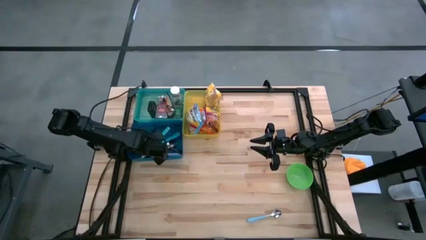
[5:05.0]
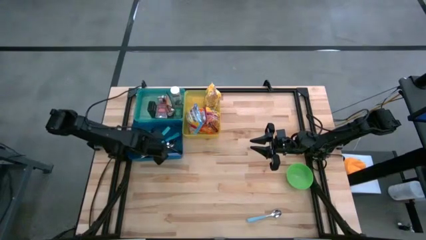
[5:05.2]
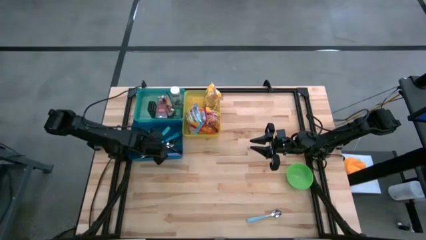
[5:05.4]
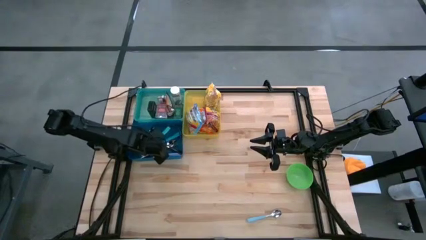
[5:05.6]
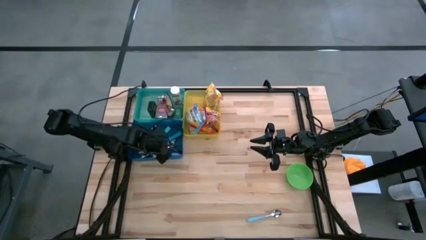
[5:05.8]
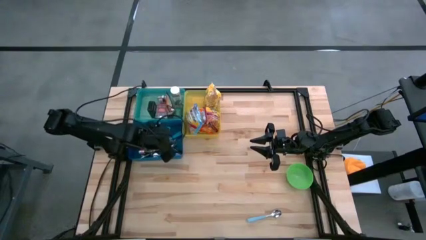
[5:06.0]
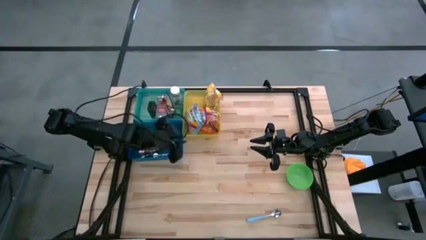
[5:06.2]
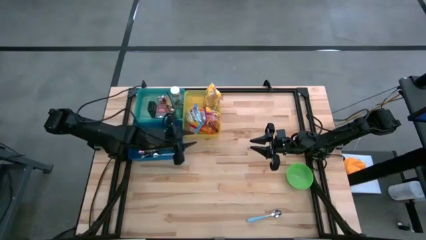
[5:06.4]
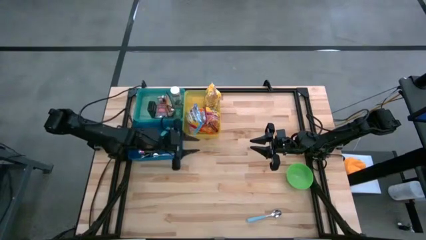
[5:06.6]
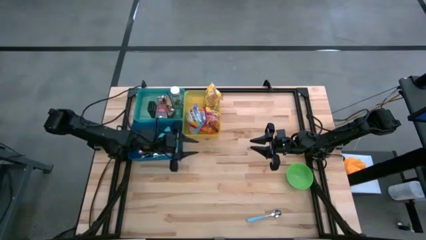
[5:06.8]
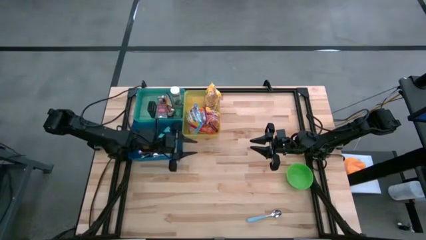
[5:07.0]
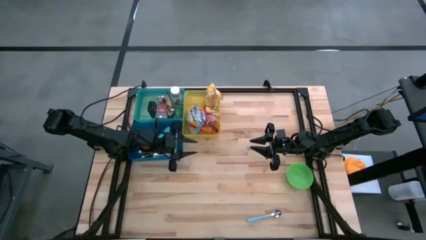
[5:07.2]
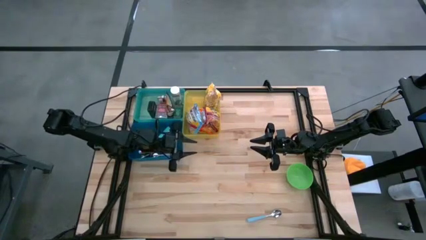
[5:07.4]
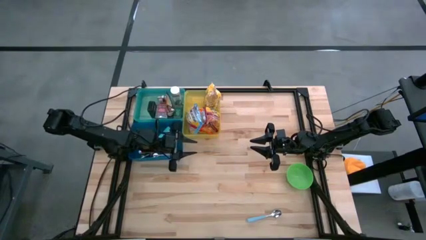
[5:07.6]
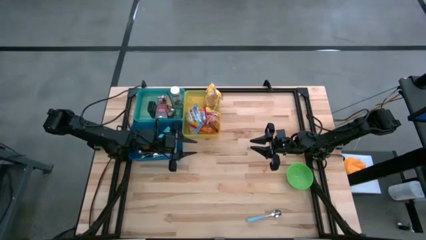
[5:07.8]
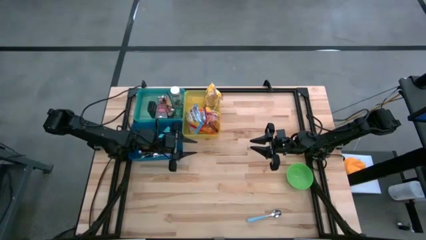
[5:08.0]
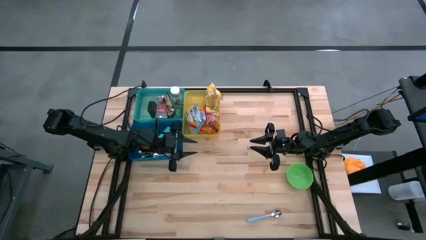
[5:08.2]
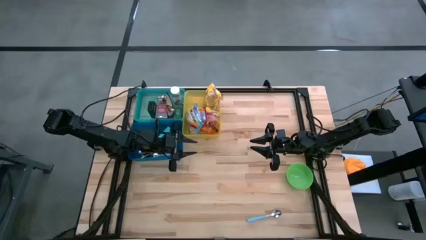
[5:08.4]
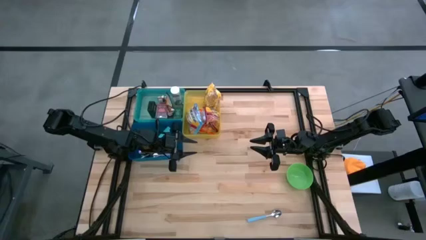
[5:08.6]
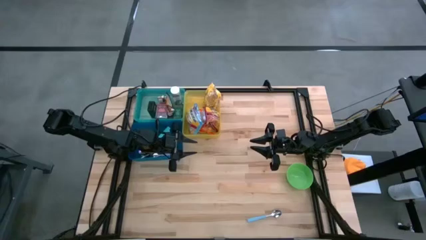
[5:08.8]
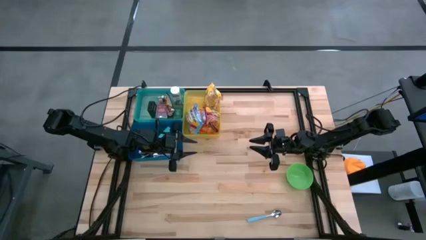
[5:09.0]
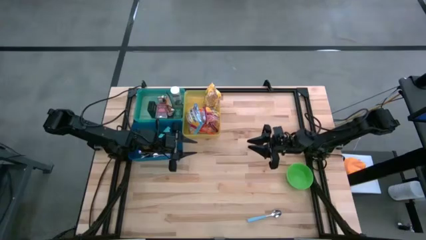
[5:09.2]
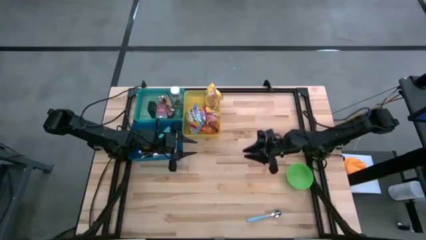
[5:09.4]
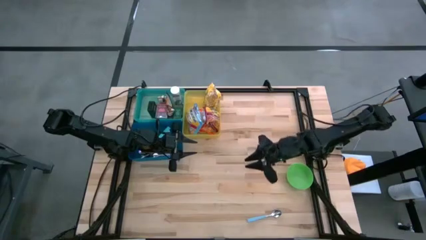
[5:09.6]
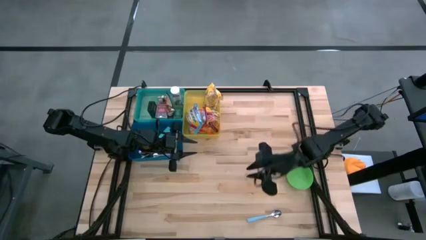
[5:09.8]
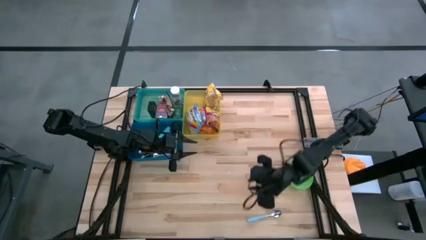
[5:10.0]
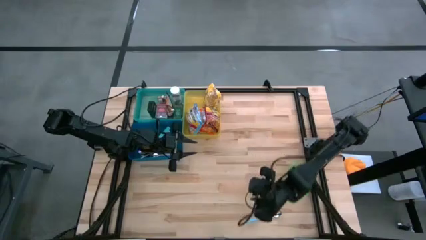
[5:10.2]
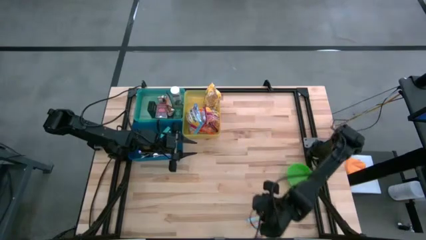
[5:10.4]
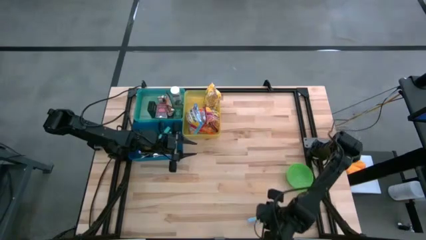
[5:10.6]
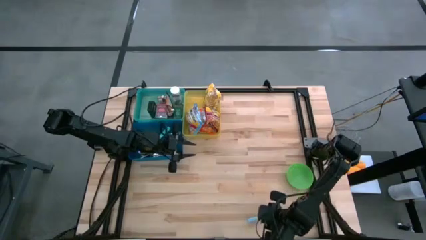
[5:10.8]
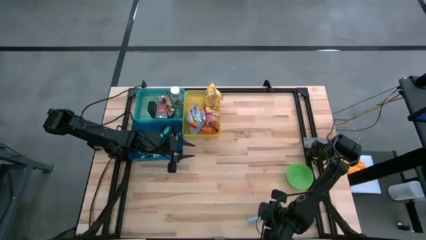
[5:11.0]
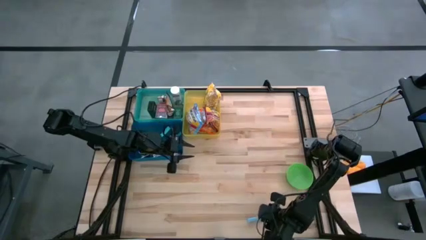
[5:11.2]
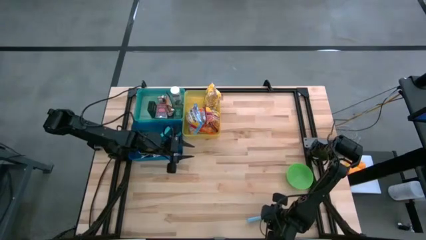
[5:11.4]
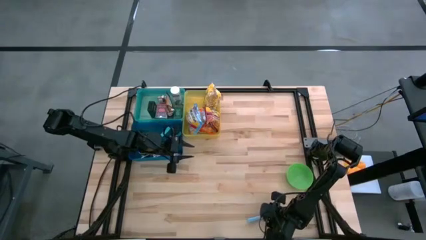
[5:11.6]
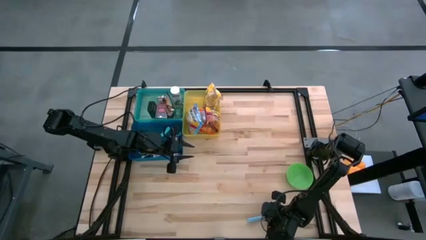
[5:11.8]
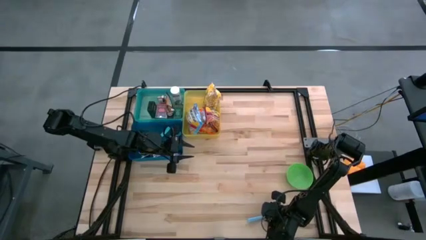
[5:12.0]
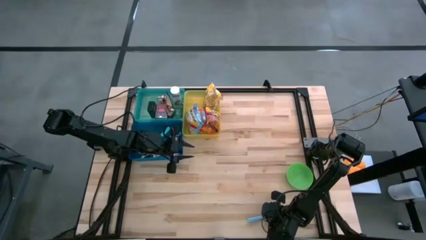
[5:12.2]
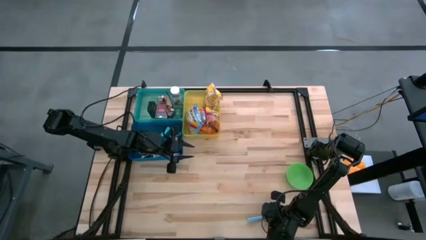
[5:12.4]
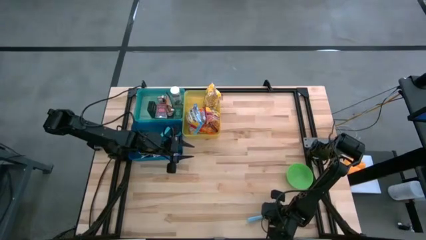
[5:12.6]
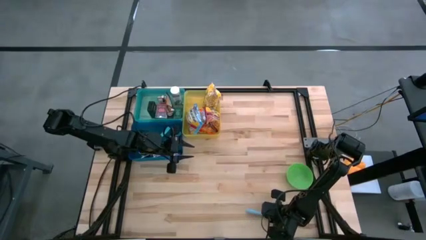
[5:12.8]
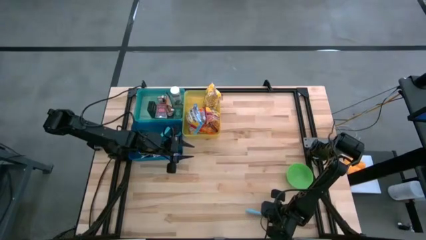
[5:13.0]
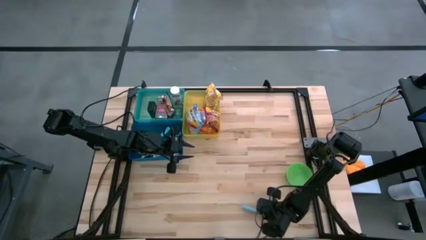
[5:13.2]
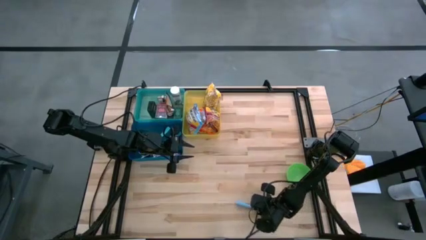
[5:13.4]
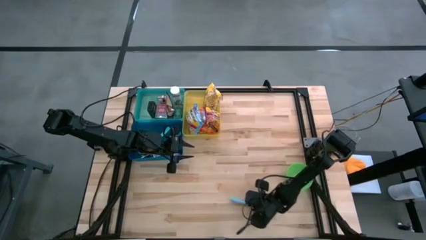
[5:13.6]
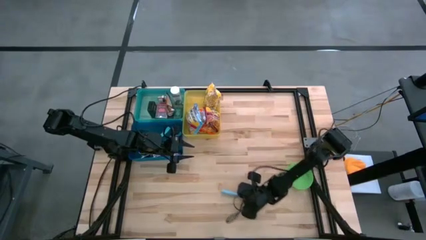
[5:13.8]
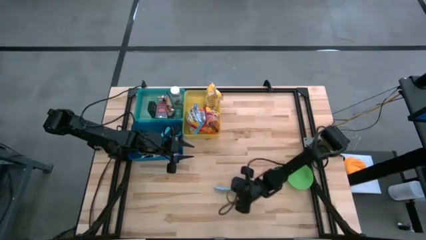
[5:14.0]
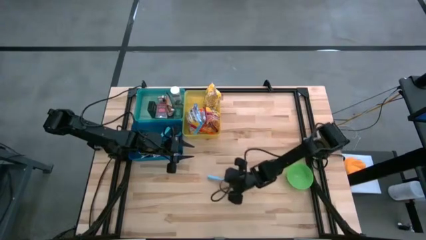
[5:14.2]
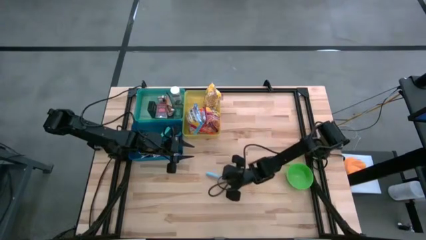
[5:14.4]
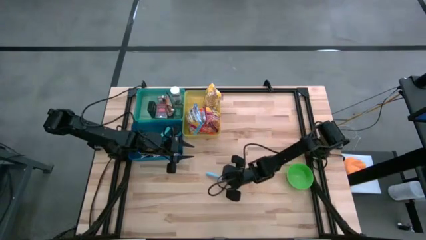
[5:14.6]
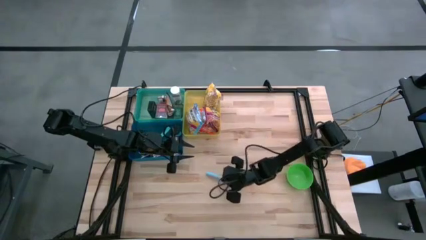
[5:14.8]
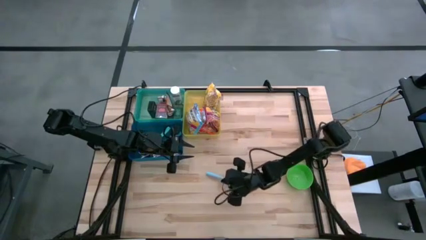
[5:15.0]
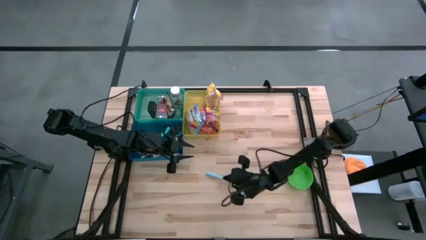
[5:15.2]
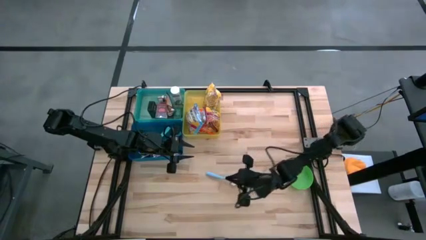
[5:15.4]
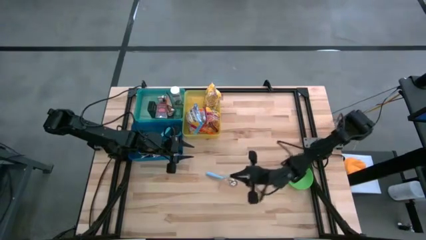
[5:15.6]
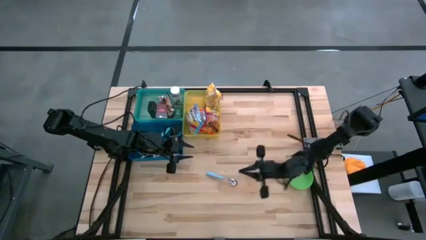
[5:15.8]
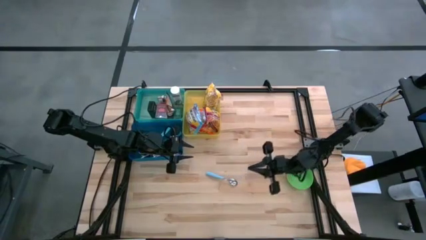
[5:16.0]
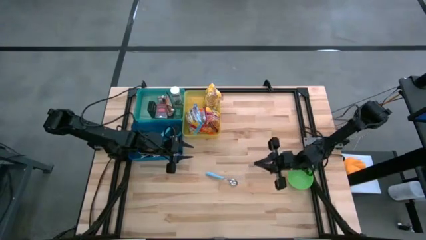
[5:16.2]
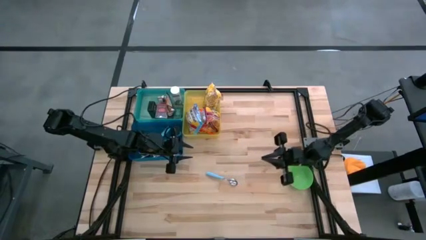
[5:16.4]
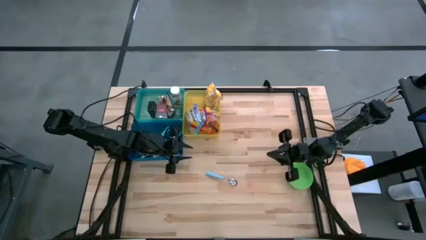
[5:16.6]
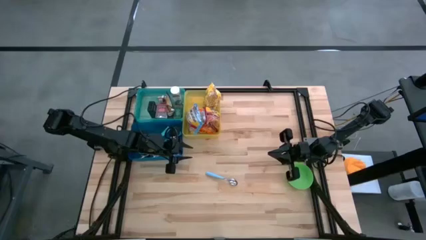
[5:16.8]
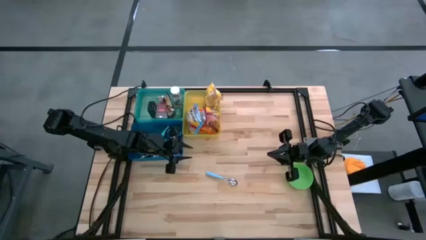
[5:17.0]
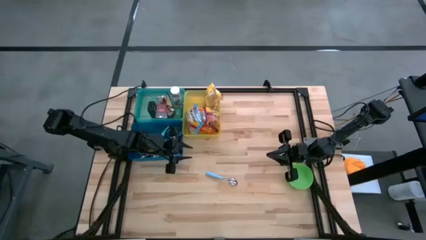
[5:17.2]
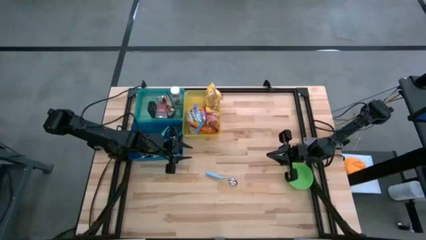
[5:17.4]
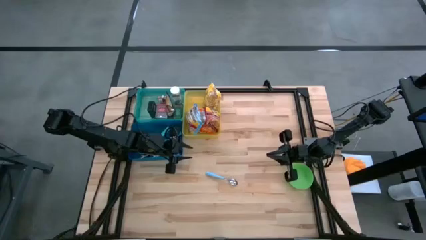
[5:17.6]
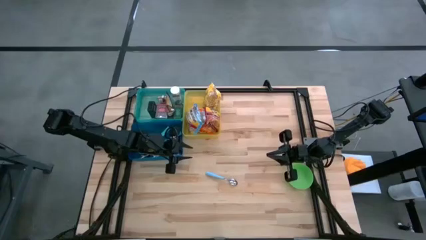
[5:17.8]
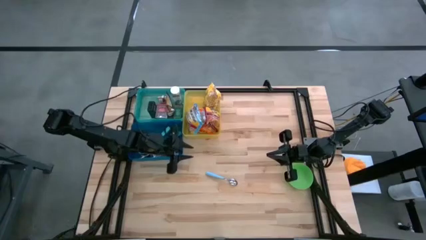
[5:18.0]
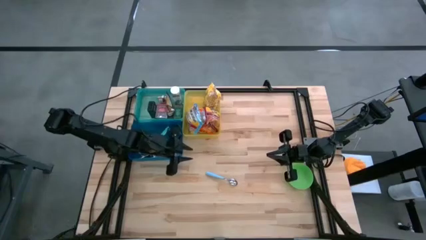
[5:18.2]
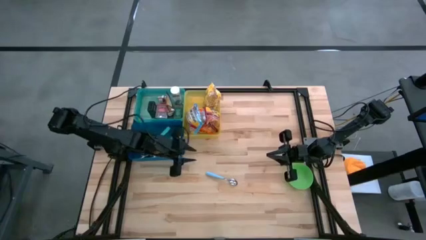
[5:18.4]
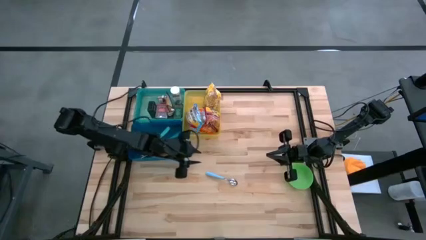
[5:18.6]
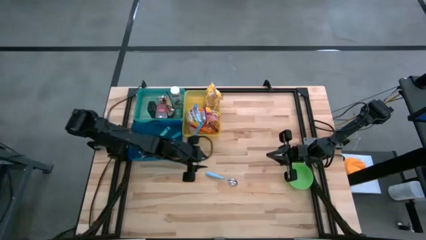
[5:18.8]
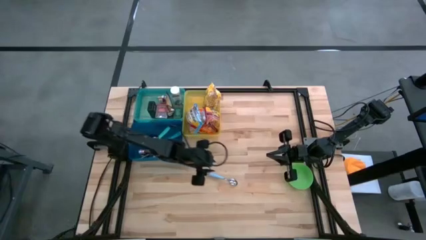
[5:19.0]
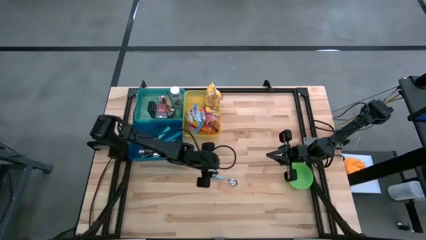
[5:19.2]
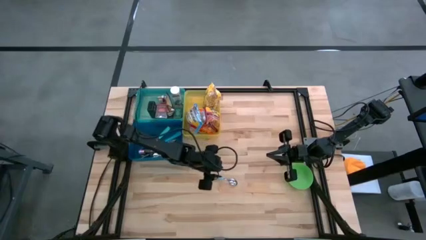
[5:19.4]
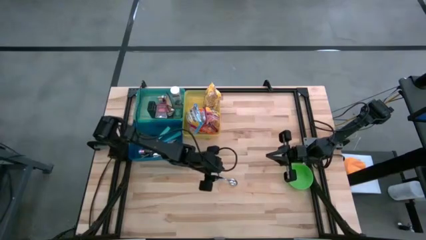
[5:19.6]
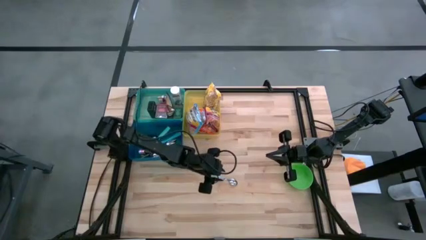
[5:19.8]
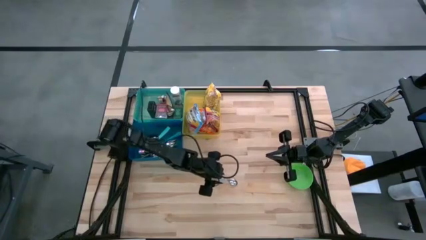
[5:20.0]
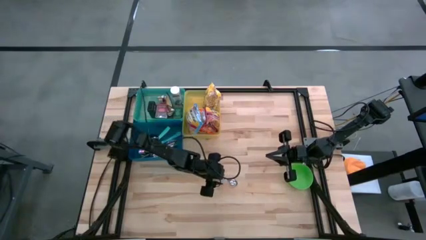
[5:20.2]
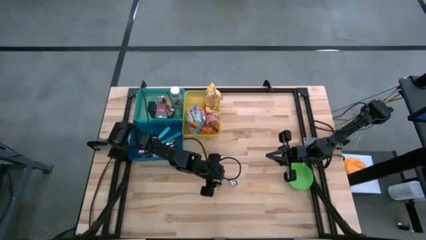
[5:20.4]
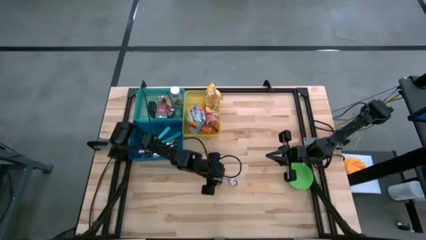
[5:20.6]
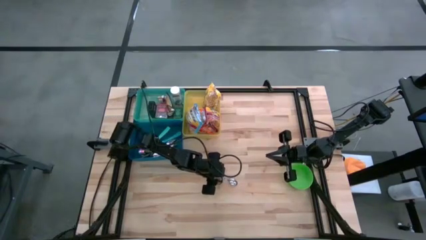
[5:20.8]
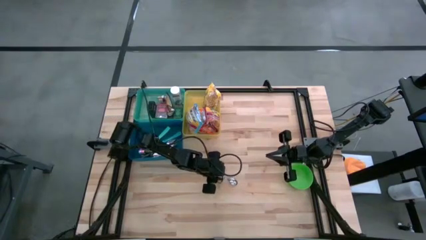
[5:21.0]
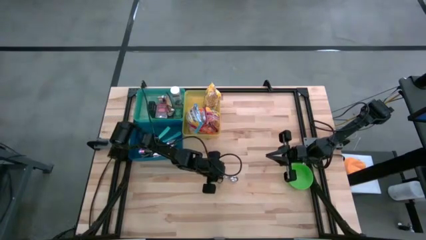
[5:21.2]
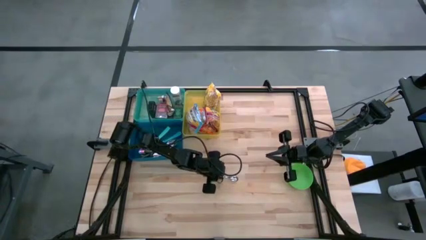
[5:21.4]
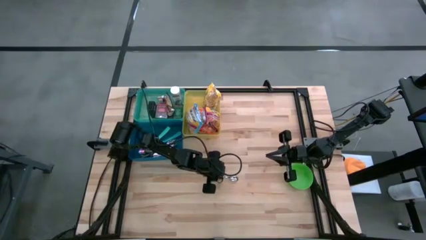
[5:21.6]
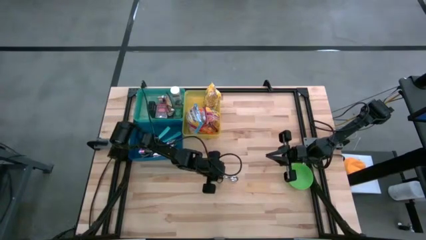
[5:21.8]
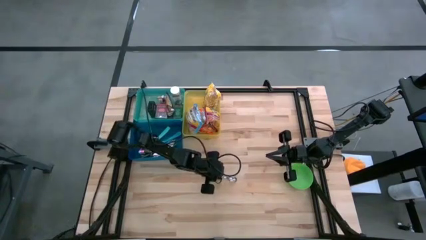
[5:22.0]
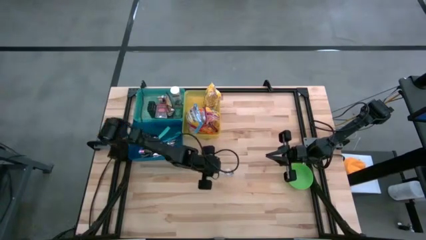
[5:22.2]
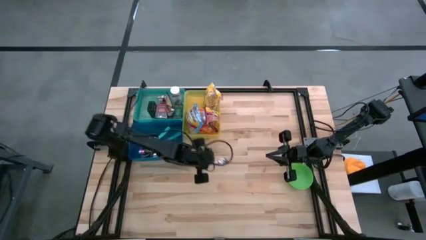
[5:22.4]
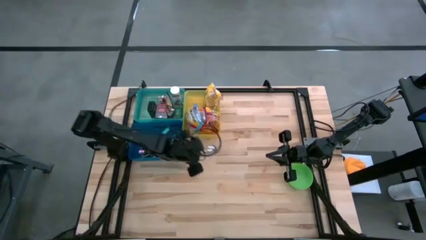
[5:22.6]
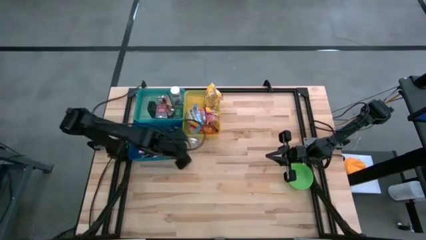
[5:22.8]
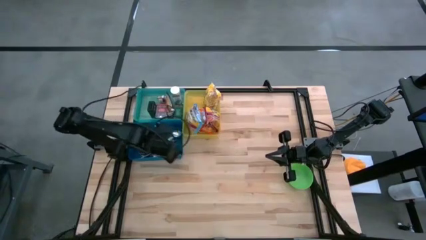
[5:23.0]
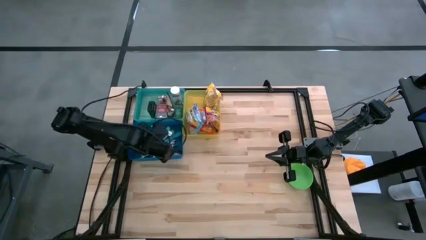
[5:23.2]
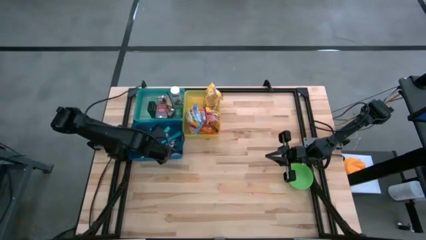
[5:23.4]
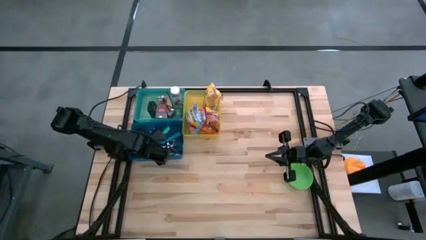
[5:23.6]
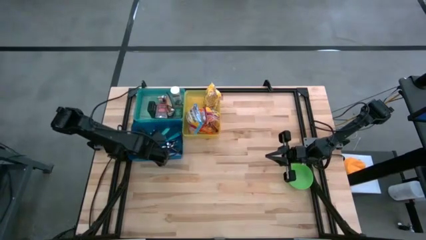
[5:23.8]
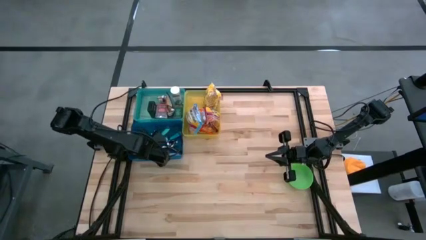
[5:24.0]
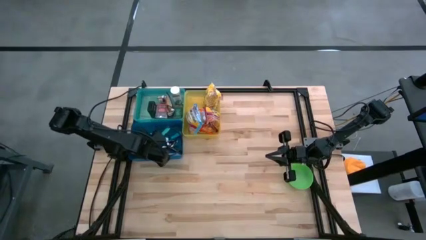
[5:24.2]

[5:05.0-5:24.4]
Put the light blue spoon into the blue bin
